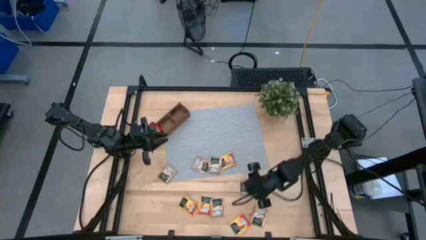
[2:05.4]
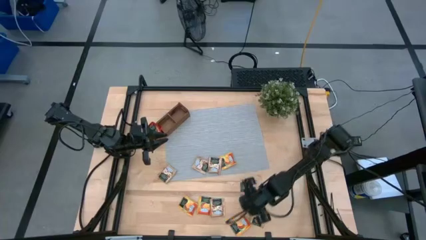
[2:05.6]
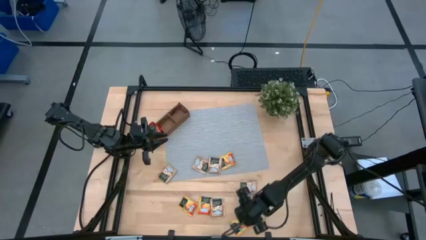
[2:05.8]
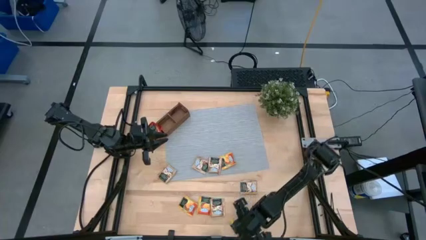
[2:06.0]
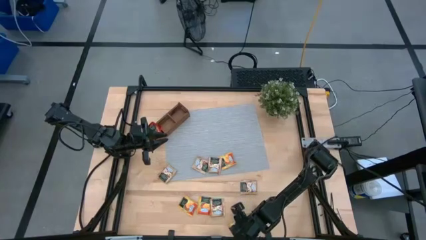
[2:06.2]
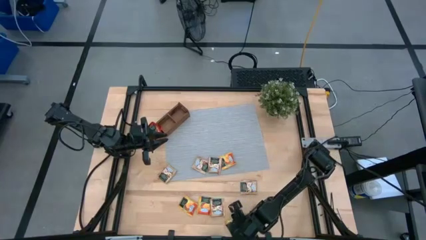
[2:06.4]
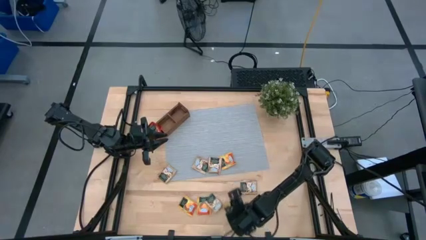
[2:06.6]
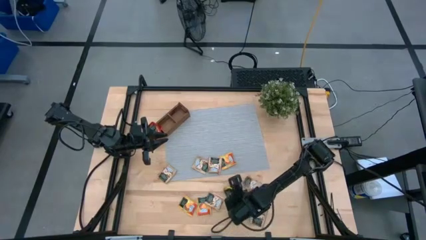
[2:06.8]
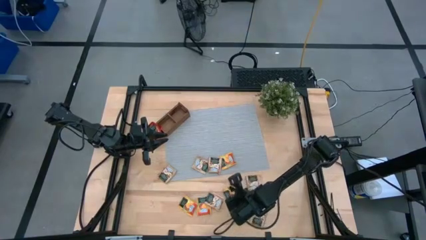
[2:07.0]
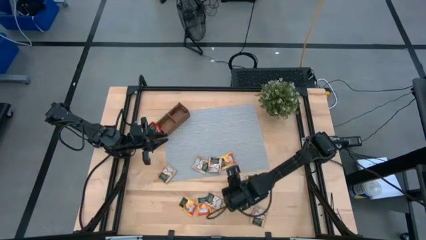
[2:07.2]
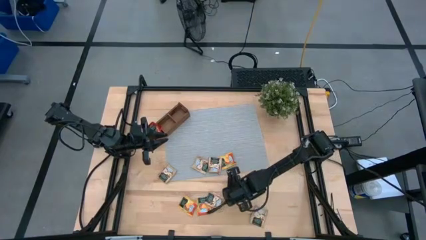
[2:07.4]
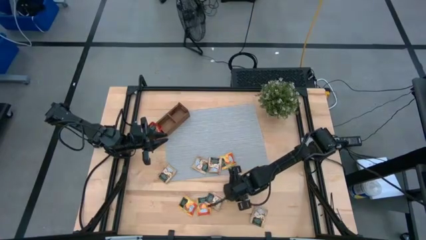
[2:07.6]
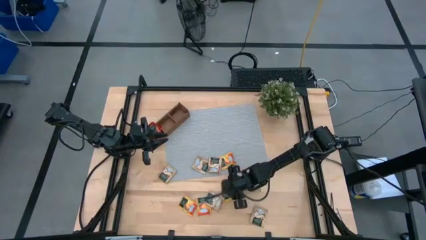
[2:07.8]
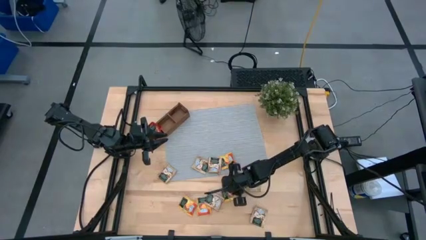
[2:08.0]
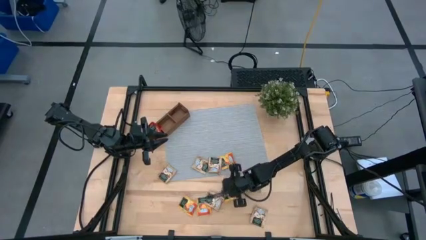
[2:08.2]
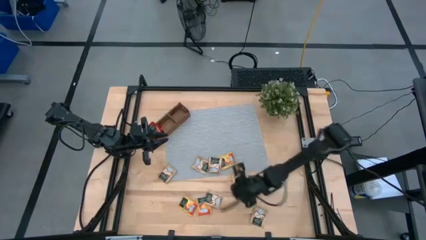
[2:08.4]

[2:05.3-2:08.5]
Task: Pick & Place Tea
Put the yellow tea bag into the right section of the wooden organizer

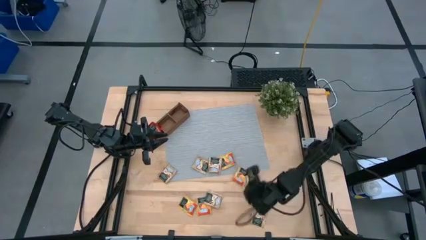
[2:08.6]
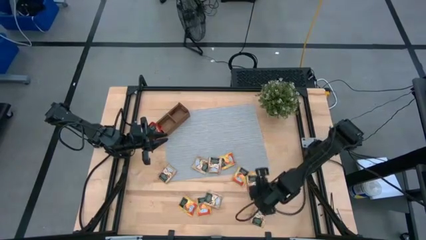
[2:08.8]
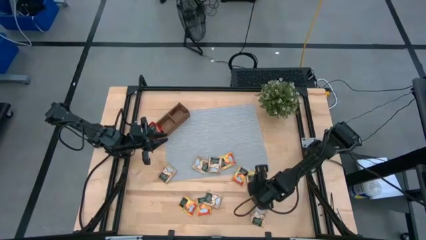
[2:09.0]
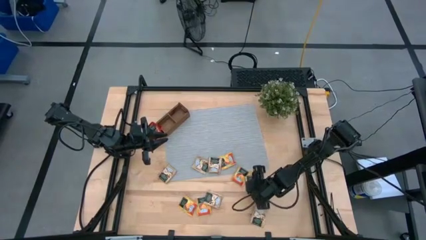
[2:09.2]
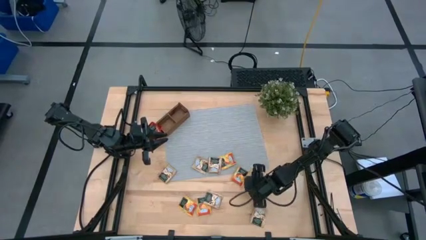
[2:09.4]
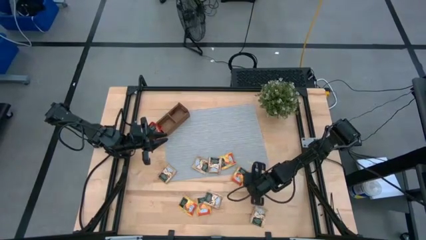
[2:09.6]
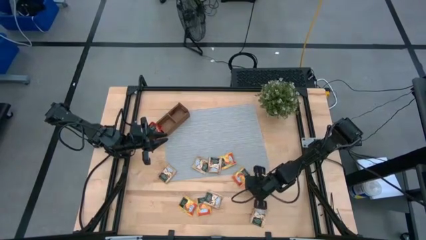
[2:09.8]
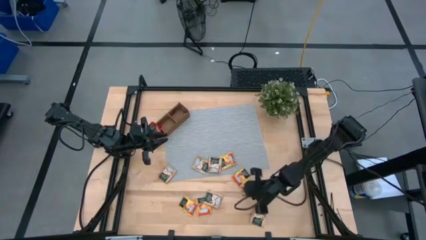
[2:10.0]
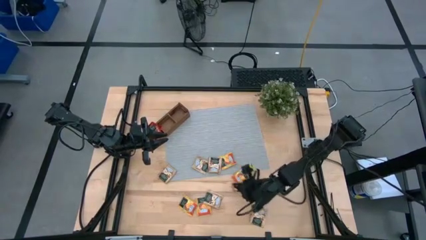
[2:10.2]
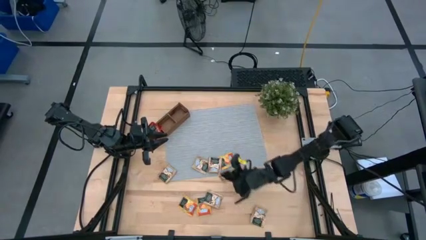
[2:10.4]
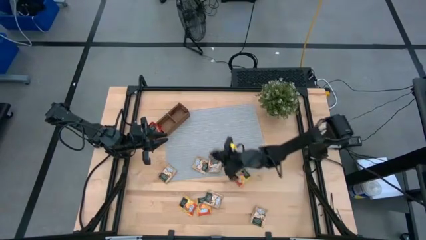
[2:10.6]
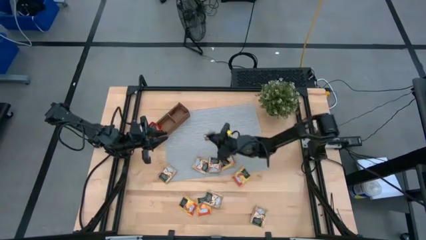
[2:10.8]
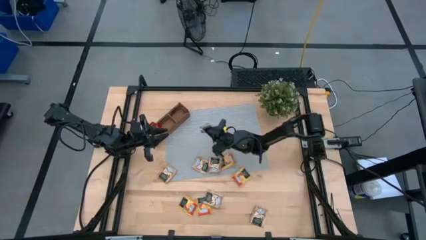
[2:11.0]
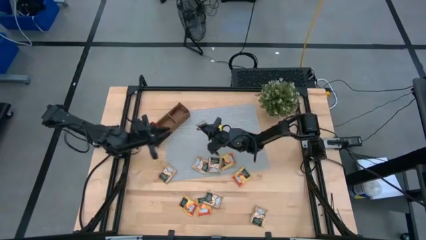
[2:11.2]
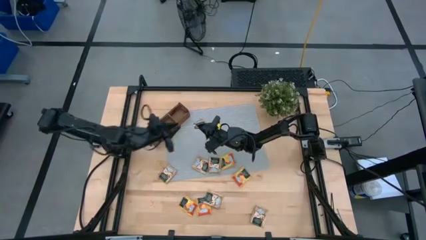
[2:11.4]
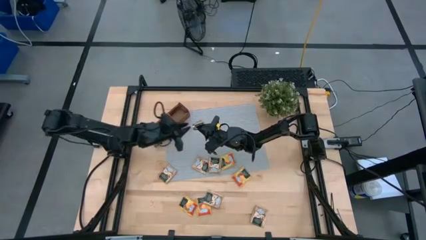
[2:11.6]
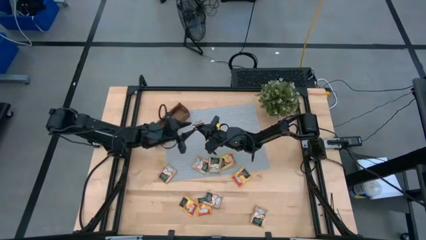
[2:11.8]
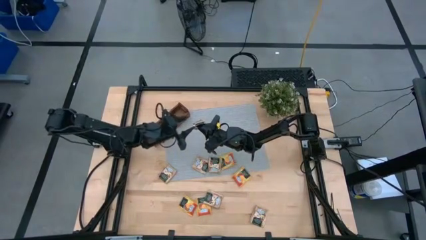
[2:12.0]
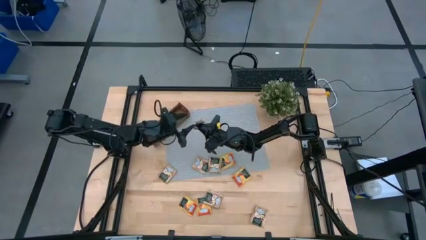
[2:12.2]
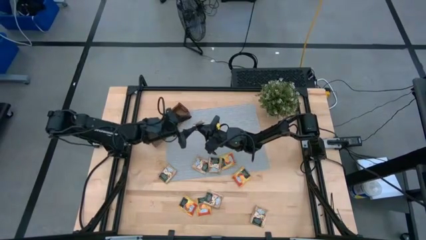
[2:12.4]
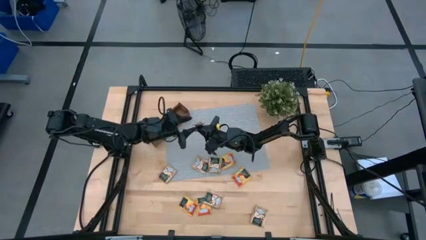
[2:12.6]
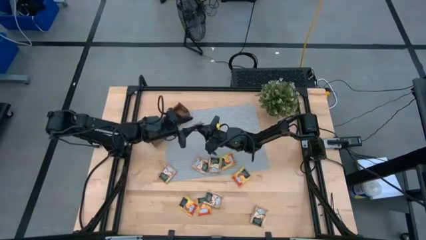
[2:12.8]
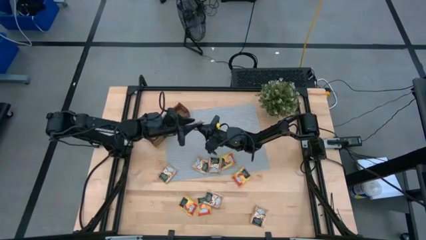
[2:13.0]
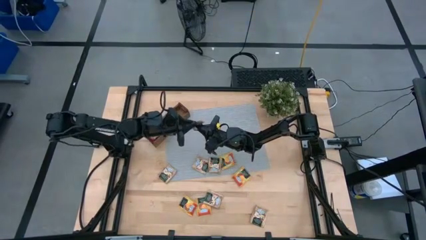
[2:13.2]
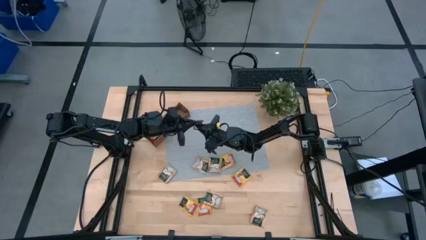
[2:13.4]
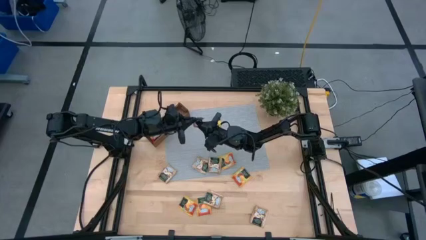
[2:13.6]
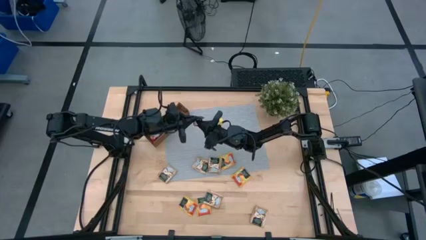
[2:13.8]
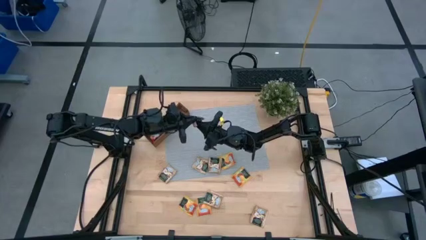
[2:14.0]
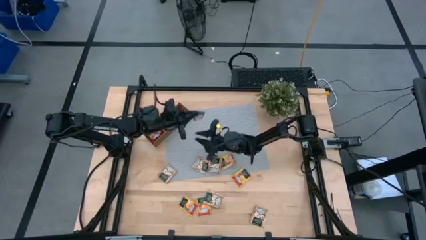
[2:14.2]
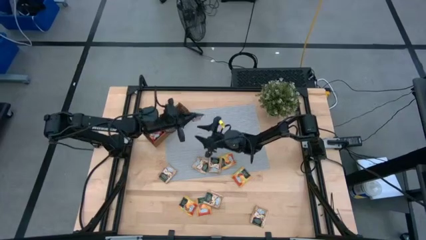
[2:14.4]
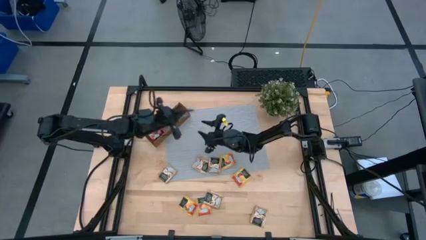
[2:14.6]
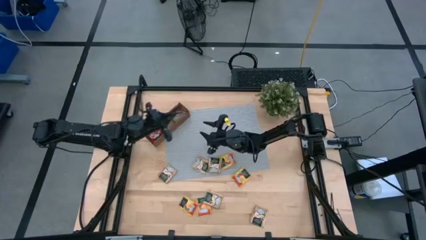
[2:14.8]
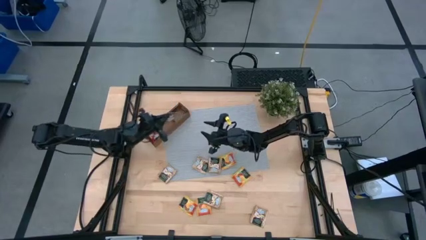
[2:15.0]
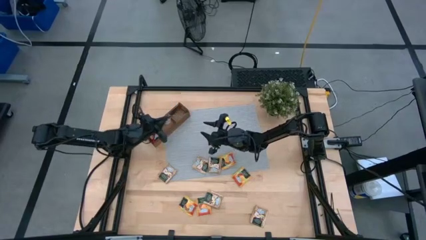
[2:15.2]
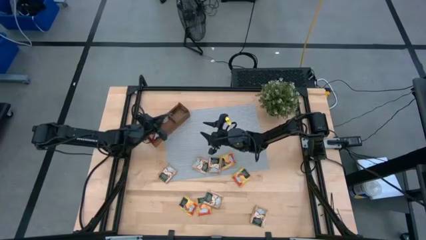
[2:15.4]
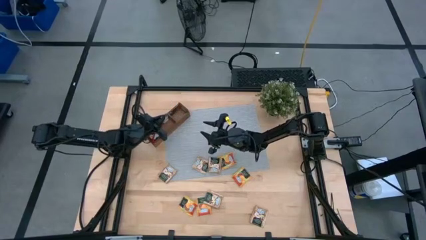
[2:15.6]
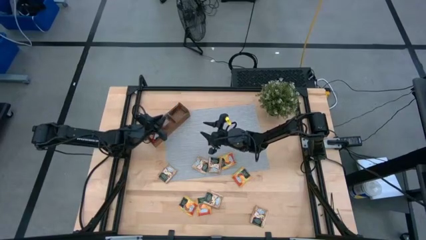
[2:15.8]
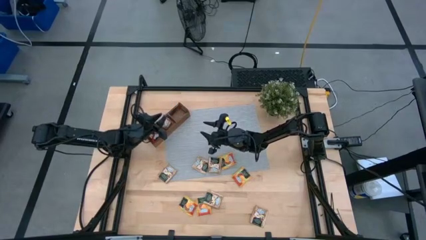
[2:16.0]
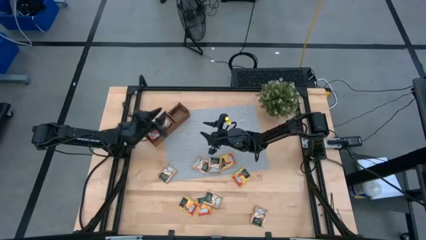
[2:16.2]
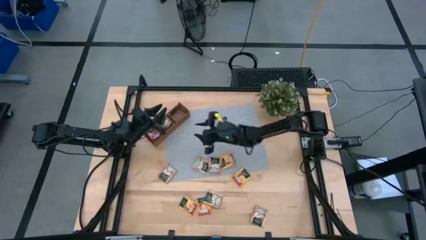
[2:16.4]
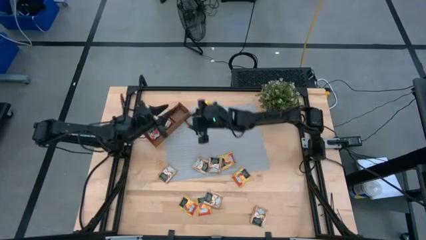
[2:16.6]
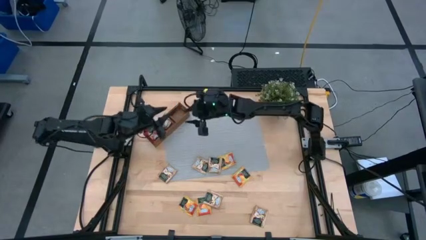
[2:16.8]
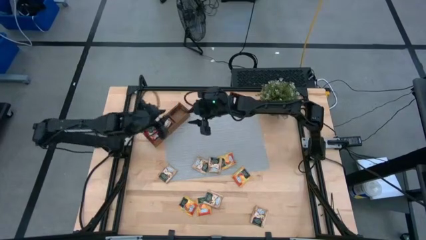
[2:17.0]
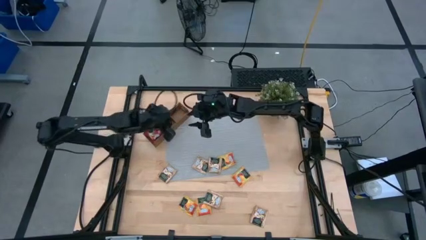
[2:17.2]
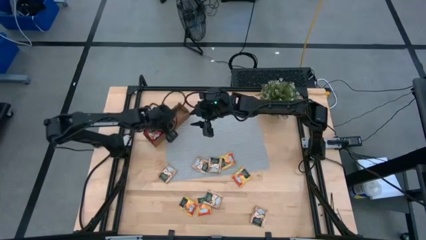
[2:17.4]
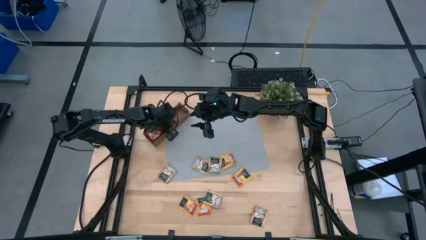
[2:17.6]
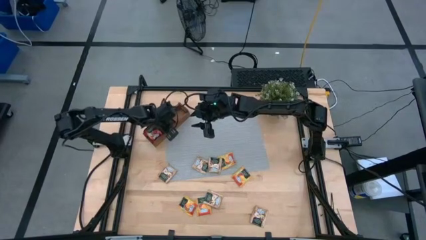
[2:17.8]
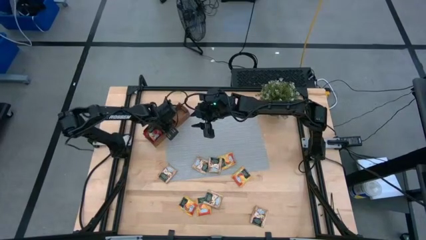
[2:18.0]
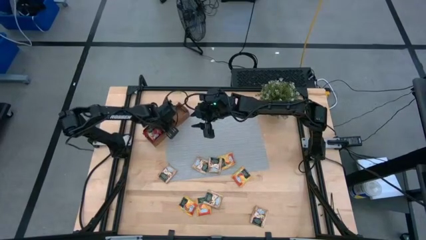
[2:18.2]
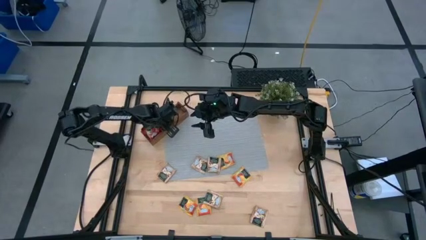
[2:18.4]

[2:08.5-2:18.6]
Put the brown tea bag into the middle section of the wooden organizer

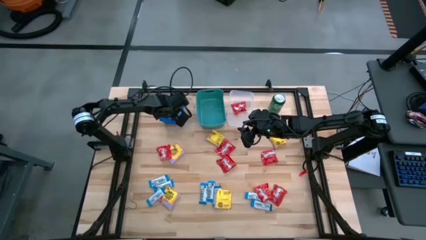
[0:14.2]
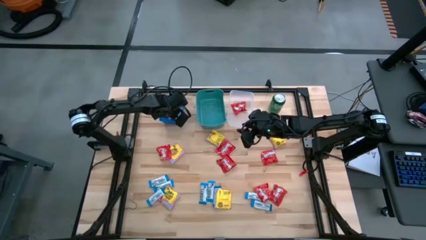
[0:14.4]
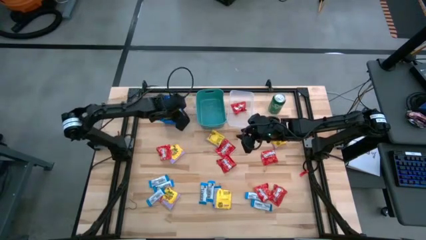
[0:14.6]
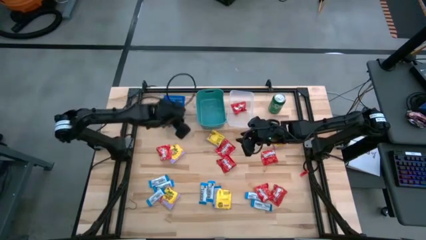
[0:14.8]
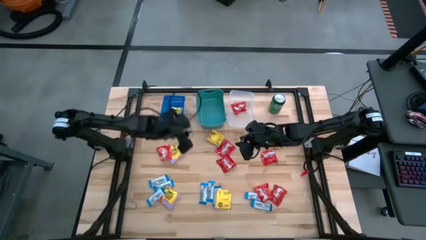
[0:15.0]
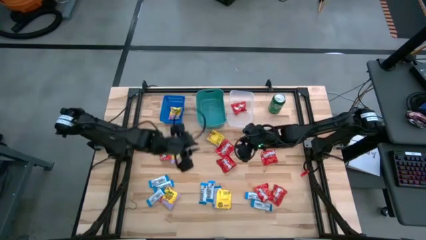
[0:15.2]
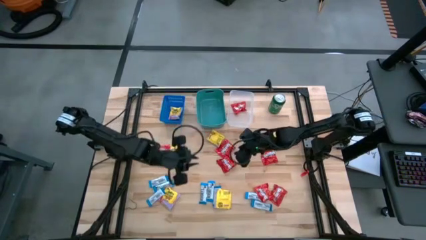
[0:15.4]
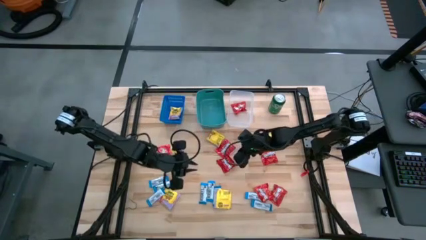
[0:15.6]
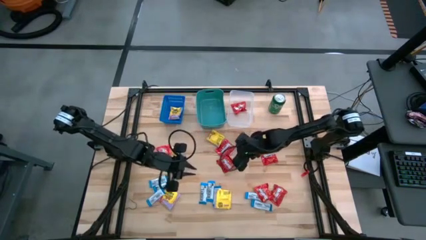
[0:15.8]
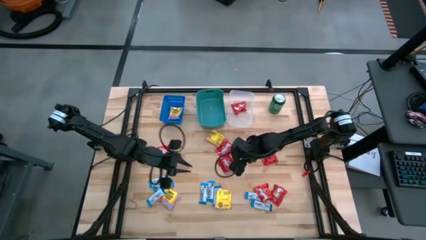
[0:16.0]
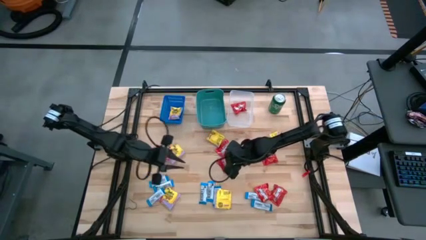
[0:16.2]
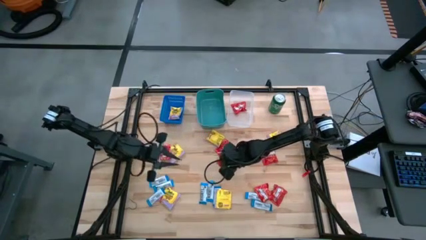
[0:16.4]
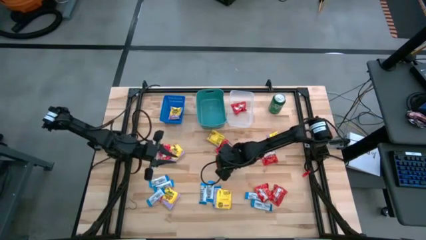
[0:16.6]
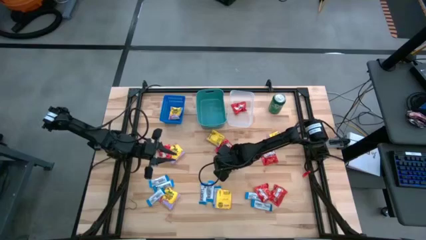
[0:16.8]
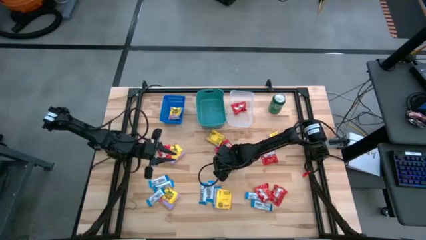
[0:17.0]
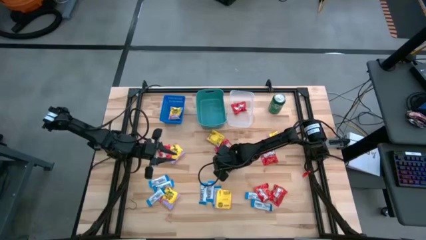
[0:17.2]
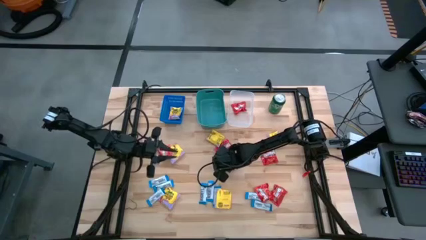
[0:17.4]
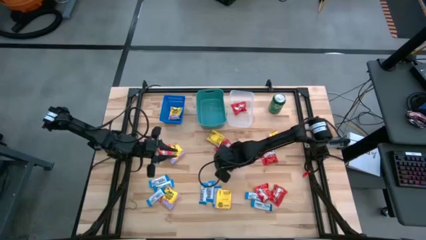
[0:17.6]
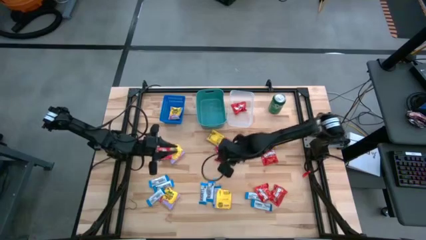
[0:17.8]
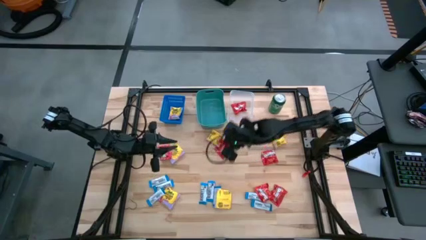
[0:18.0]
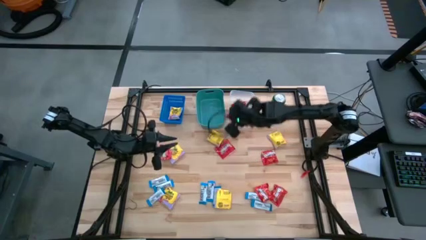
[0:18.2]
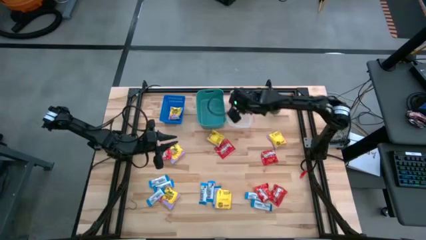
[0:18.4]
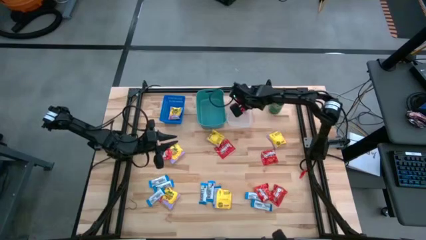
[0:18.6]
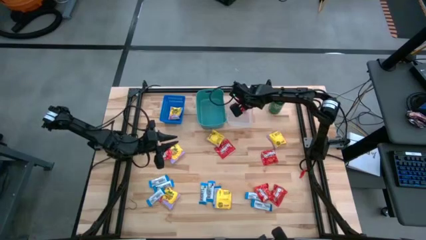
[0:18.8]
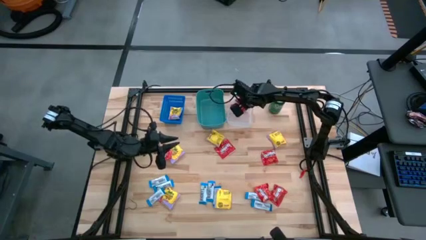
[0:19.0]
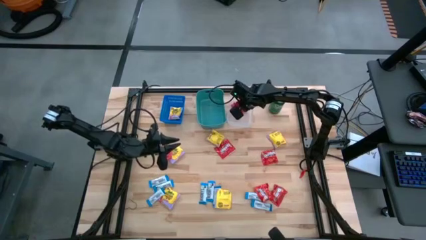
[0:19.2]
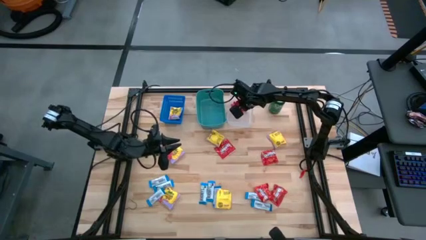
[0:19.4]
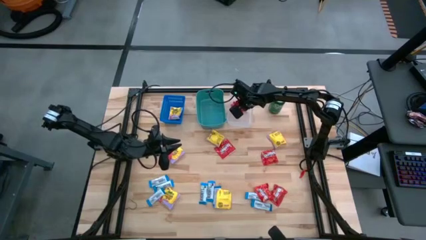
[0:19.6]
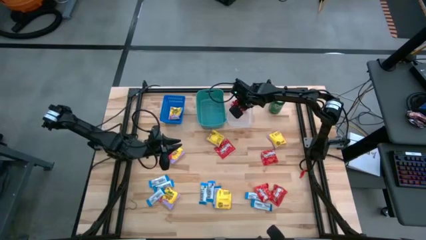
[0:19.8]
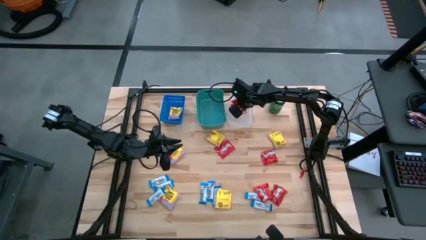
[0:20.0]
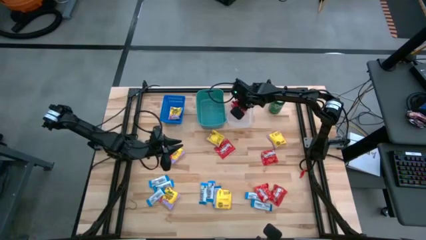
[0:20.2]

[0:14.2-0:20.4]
Task: Sort candy
Put the red candy into the transparent bin
